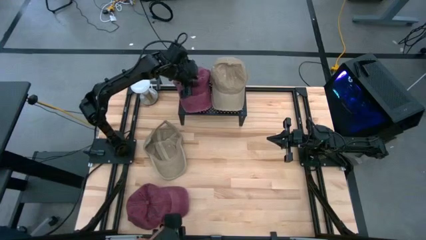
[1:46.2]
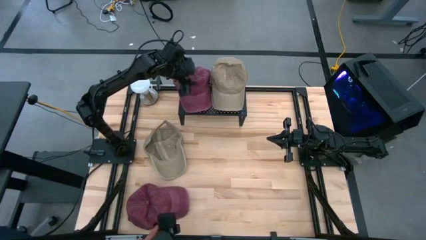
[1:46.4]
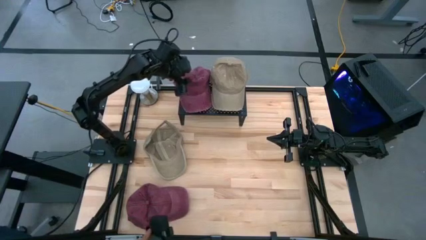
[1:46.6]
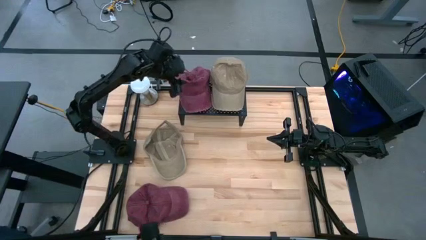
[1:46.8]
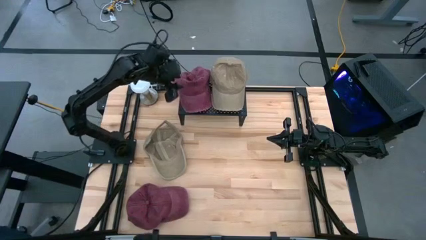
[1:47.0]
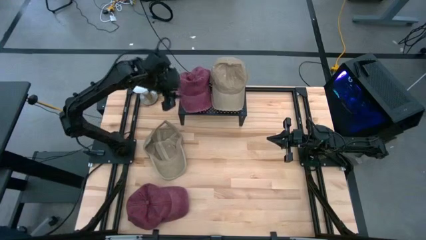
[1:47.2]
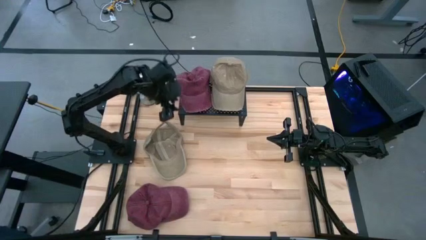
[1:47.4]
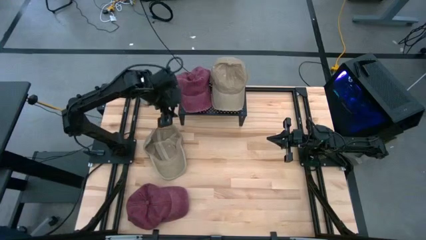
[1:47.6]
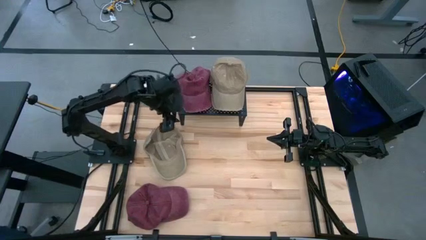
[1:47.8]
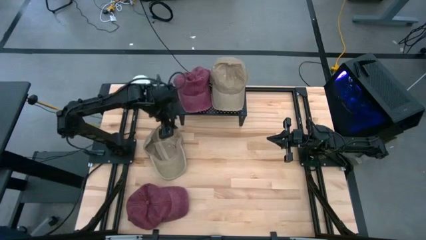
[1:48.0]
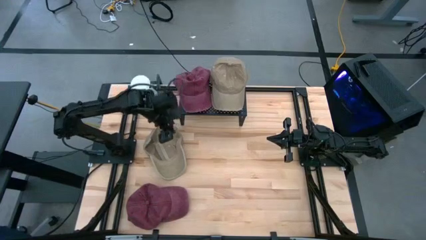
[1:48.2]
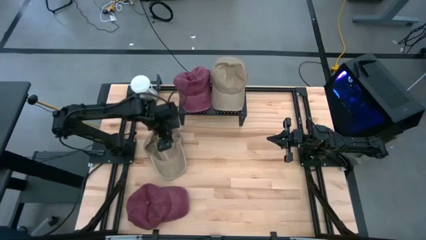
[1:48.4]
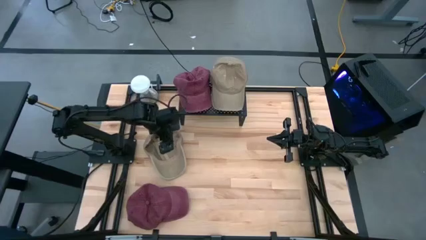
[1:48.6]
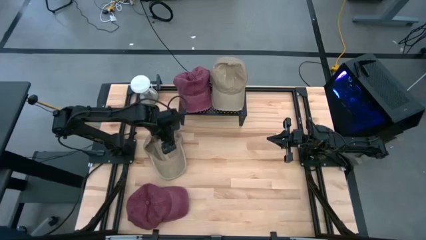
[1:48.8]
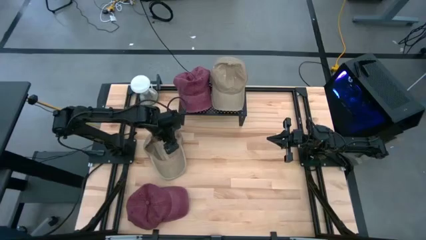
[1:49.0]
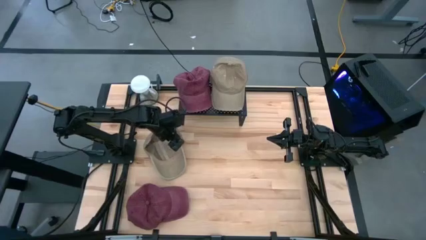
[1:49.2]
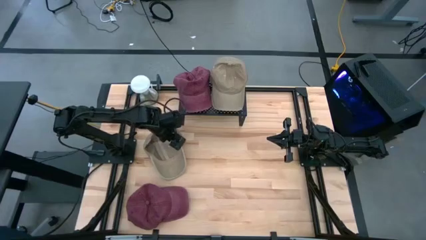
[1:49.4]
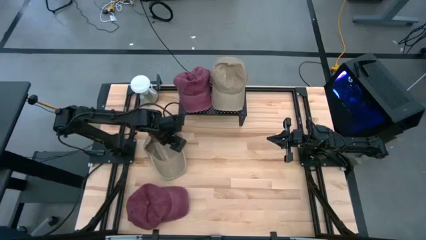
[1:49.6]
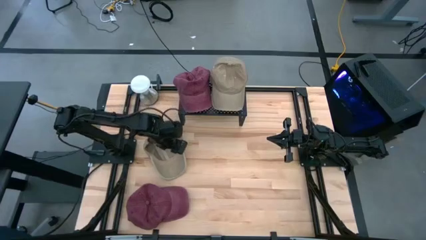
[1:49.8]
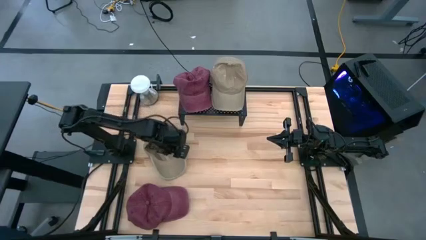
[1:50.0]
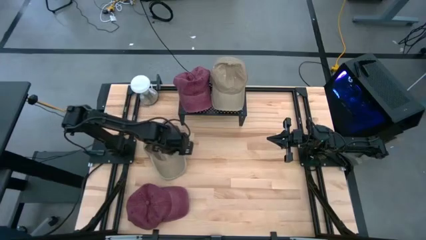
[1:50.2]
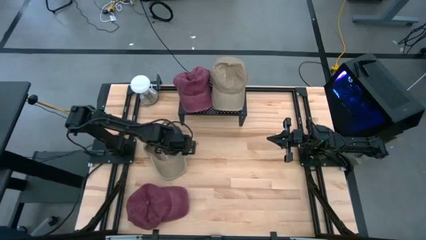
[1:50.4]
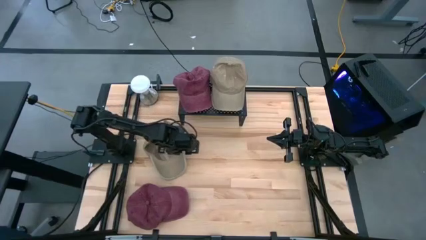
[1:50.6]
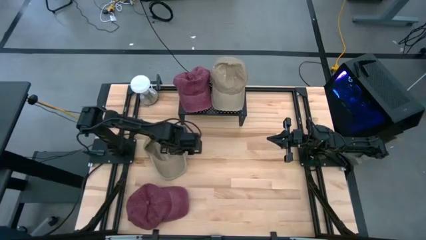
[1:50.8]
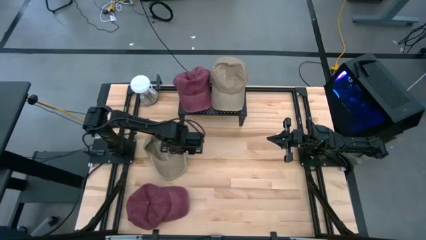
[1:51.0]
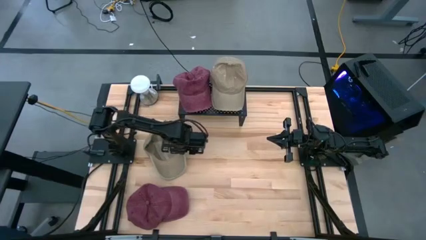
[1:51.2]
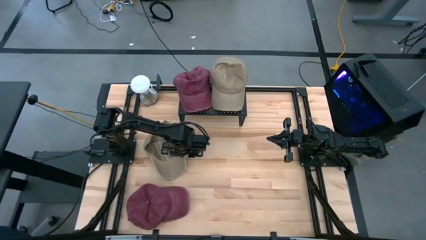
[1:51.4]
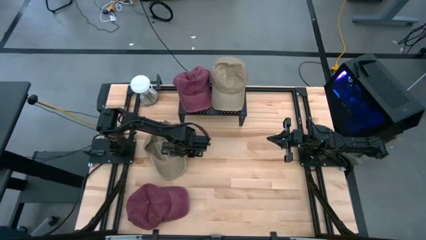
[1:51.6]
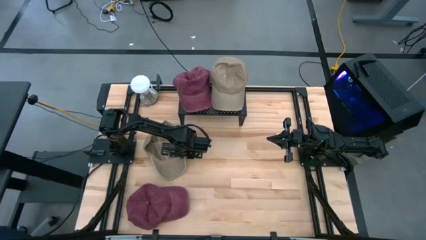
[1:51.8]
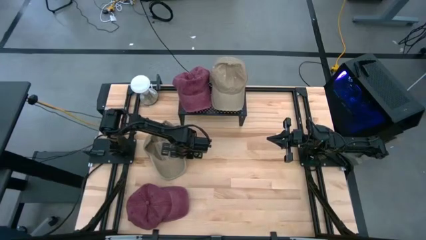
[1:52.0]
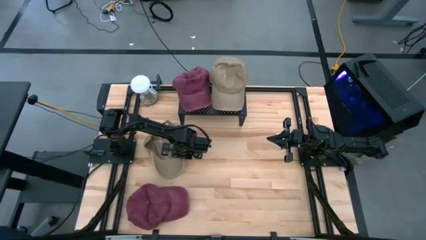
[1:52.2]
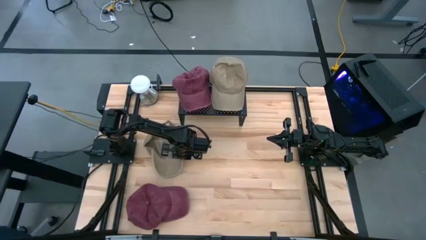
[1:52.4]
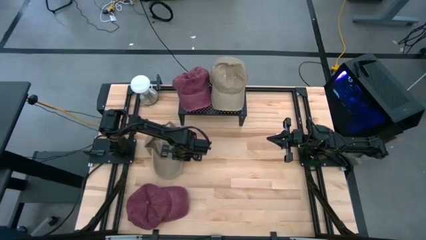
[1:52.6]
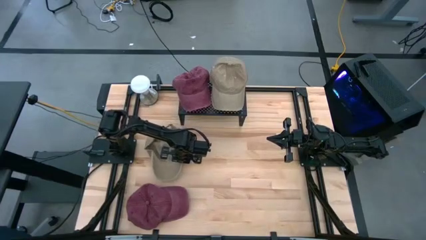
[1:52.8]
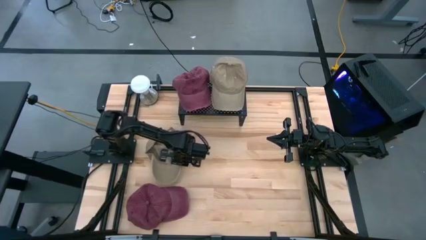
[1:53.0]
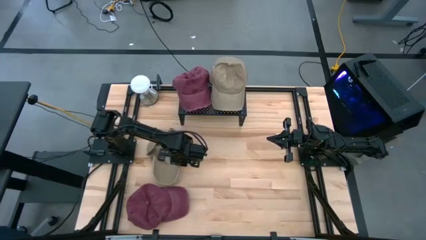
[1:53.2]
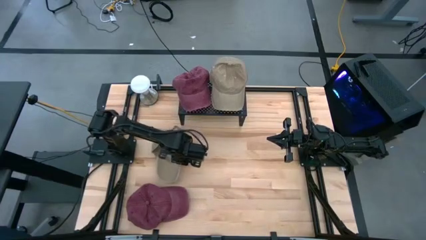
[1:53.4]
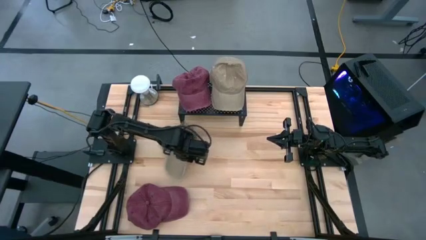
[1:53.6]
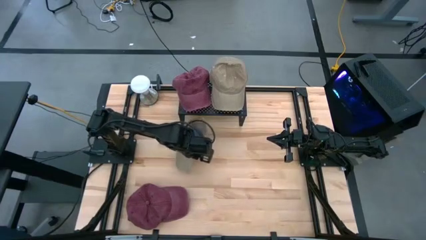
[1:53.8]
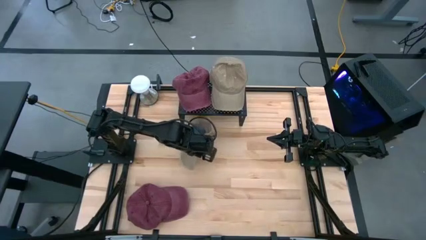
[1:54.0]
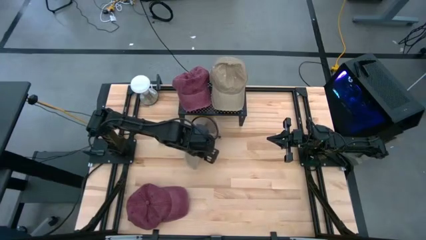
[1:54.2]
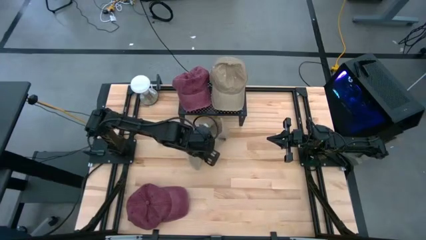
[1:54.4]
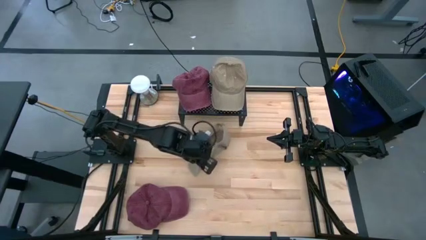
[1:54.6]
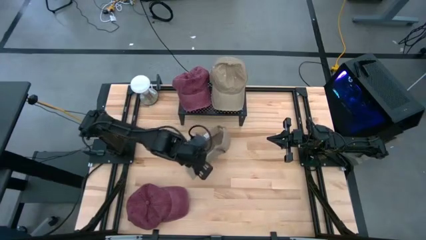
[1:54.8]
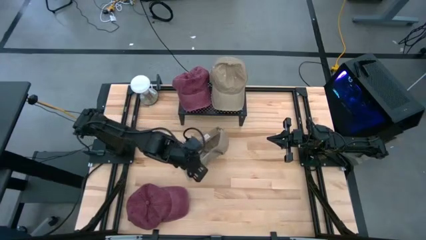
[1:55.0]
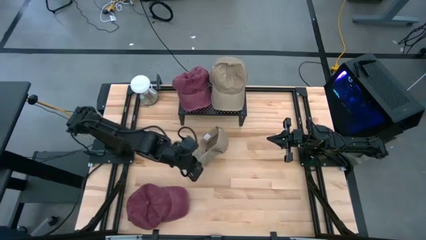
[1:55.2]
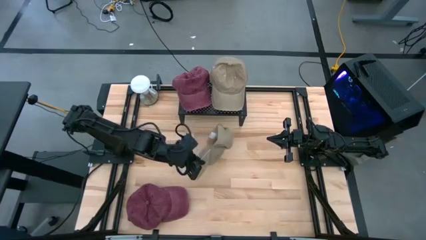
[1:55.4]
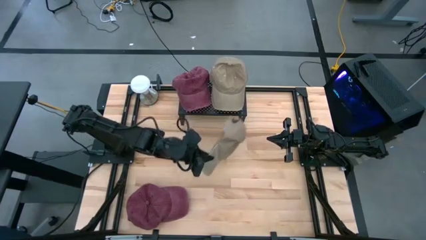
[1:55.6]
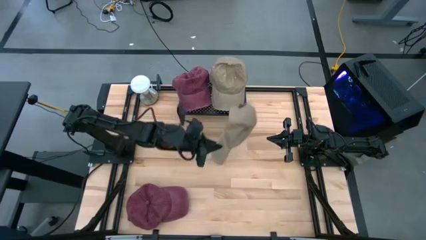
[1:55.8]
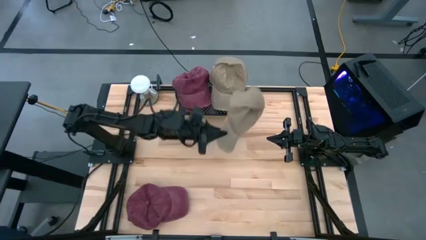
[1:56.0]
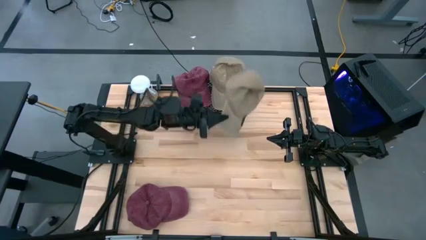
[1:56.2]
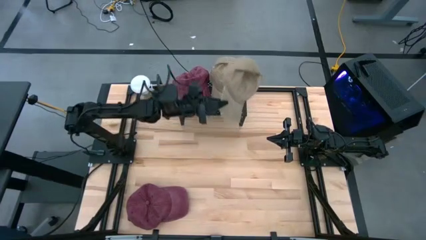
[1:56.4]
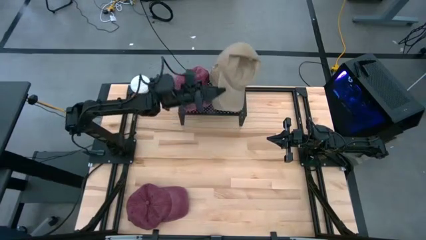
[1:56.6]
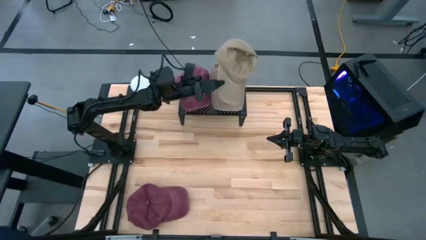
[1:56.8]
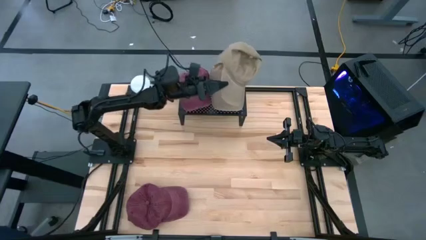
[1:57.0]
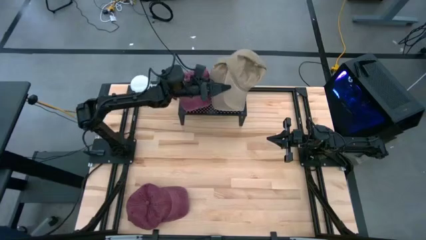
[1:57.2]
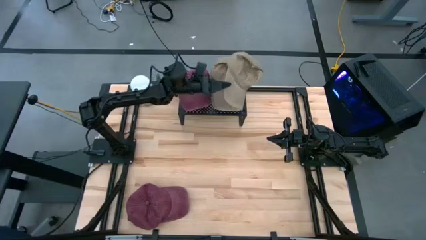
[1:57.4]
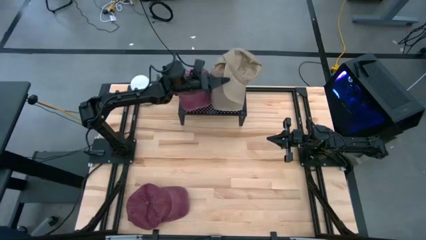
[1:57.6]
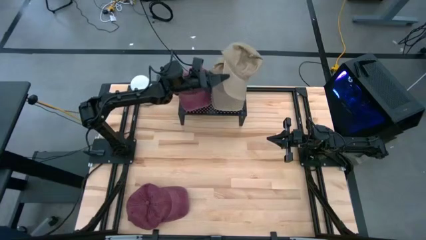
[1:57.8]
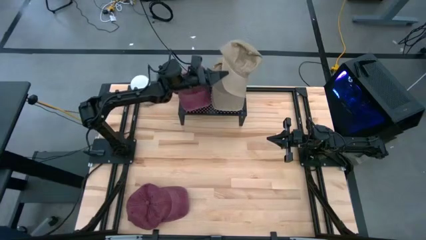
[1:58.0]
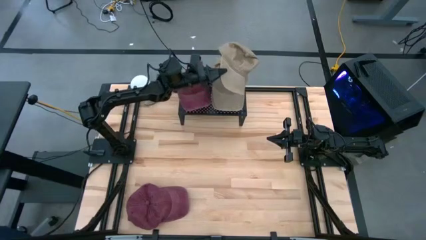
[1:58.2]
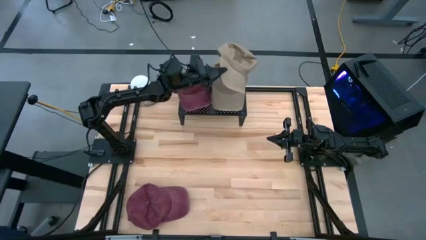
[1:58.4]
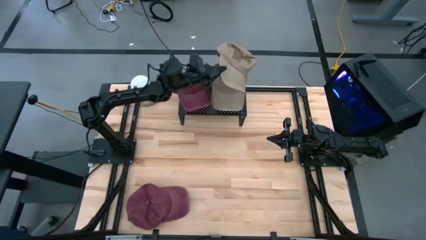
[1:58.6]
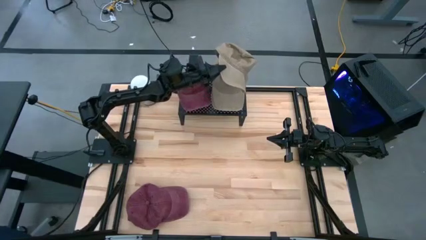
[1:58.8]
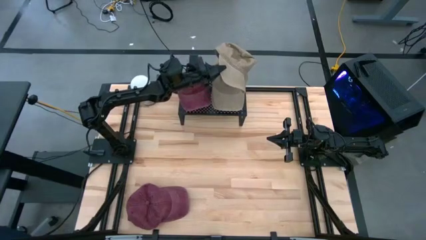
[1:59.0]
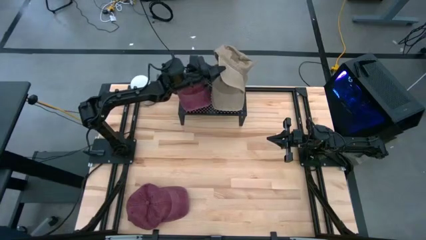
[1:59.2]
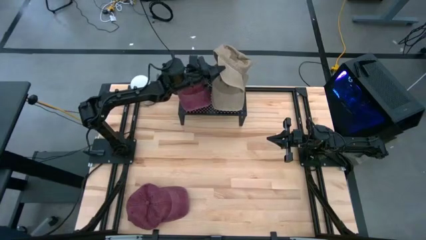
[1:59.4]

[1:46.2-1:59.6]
Task: Pick & Place hat
Stack the brown cap on the brown cap on the shelf

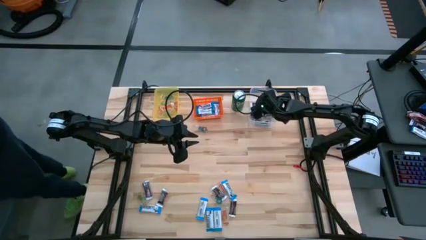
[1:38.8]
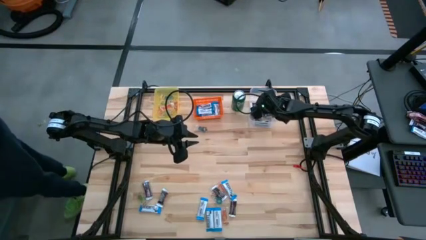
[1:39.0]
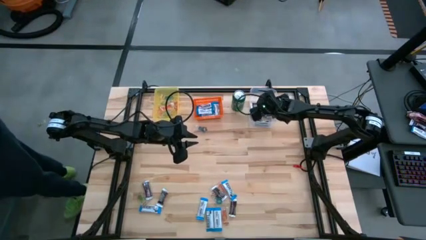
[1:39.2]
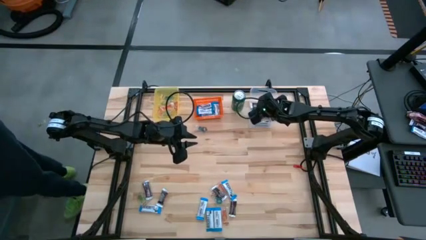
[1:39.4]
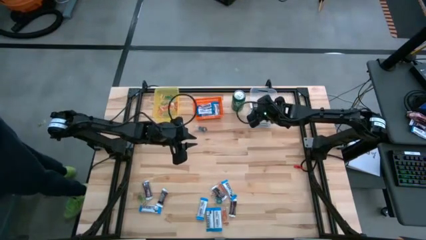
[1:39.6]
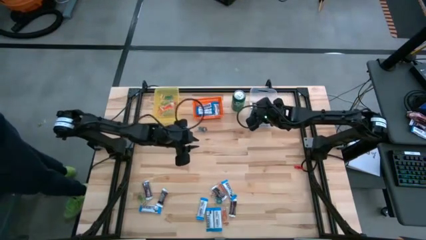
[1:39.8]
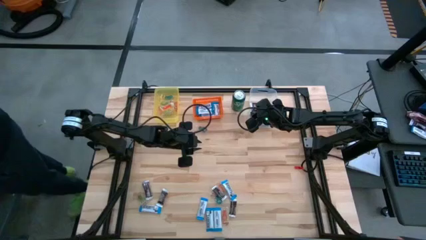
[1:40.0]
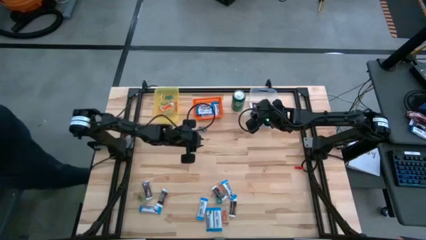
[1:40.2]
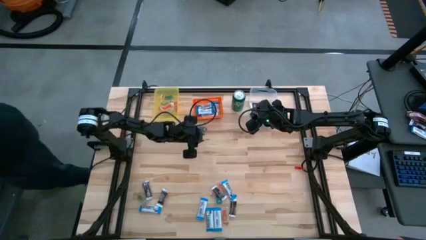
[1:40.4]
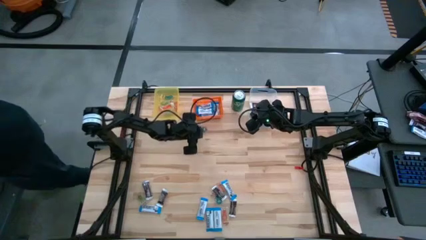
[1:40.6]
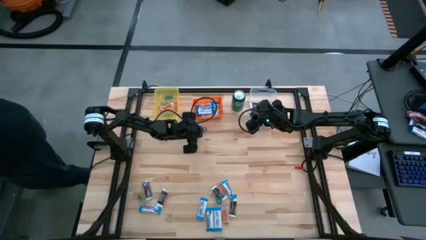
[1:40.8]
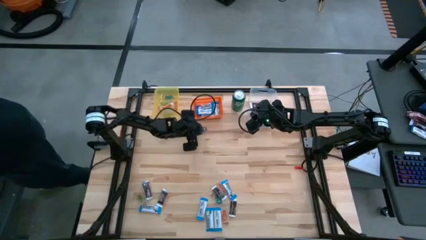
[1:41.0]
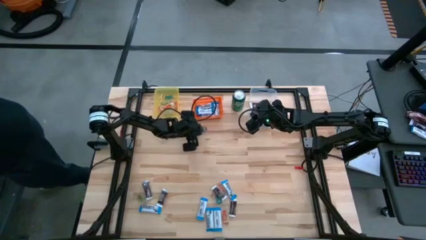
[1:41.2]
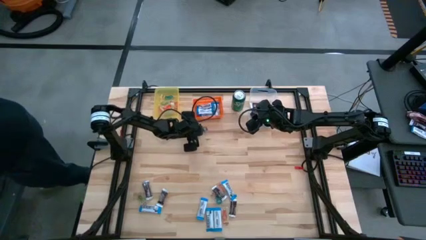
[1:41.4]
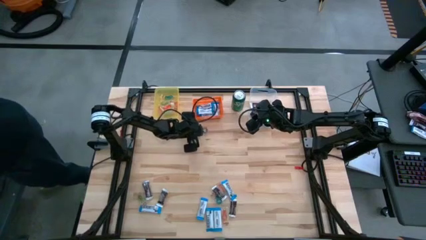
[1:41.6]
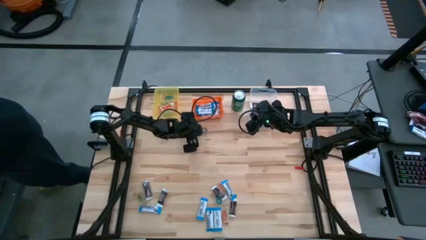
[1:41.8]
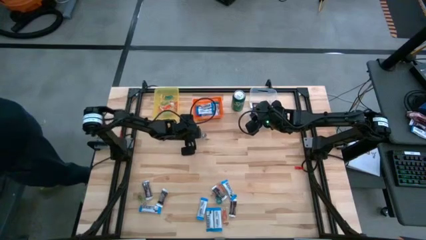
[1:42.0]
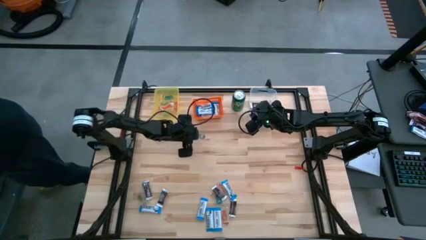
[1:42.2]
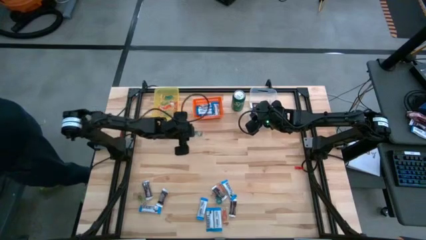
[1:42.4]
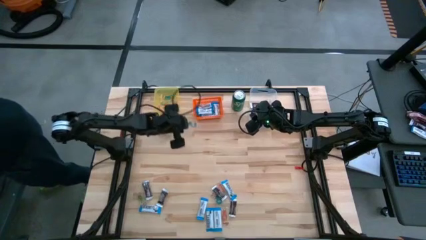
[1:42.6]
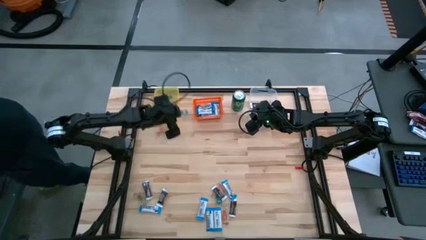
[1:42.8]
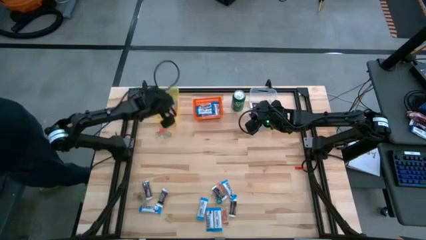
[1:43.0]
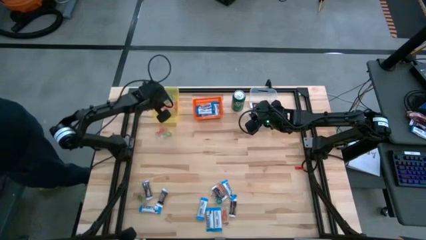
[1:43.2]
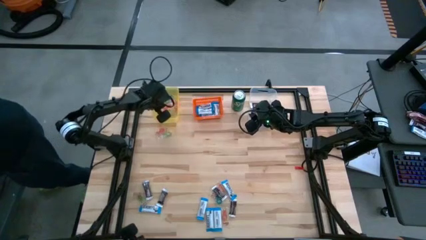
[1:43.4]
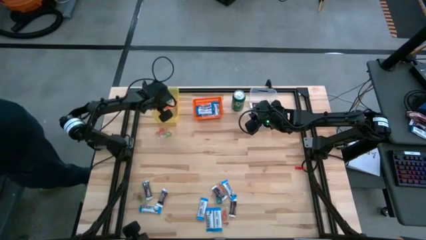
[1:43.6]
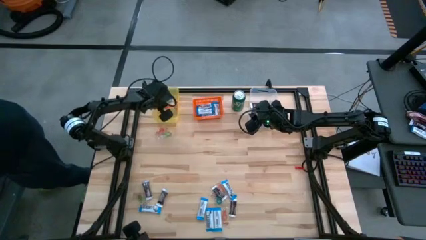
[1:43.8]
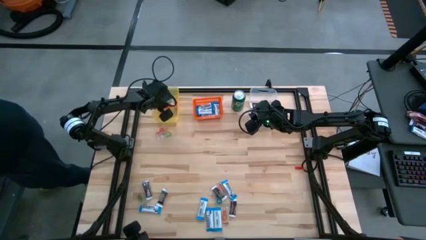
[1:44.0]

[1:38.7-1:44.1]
Task: Organize candy in baskets
Put the blue gummy into the yellow bin
